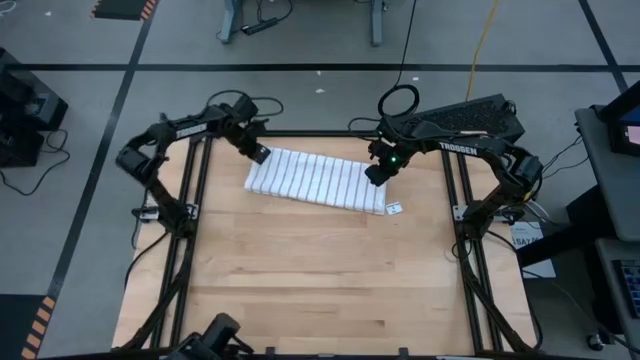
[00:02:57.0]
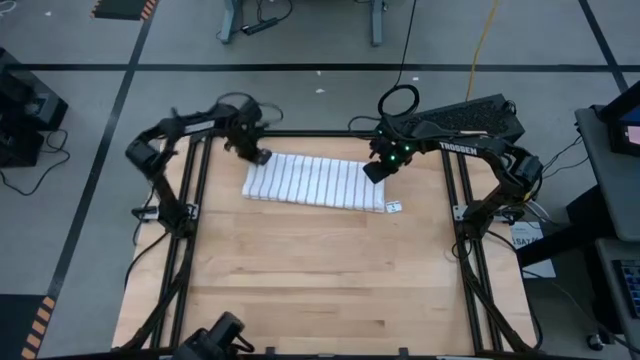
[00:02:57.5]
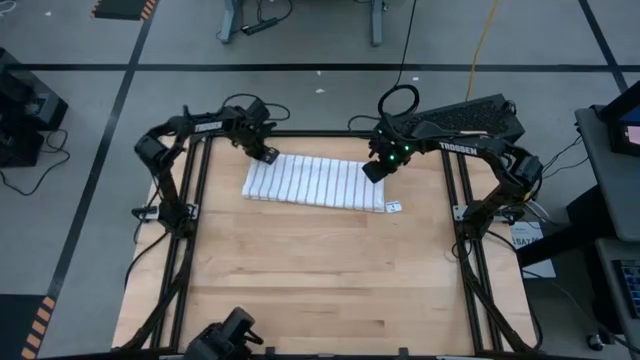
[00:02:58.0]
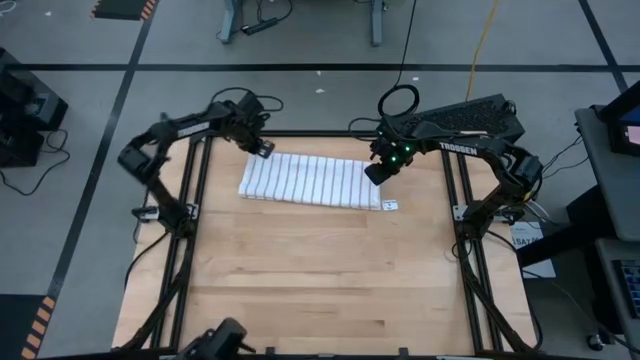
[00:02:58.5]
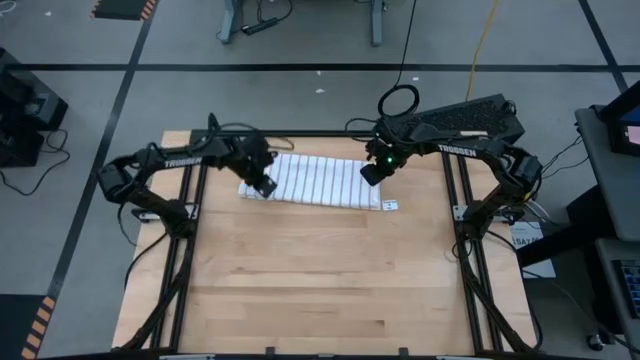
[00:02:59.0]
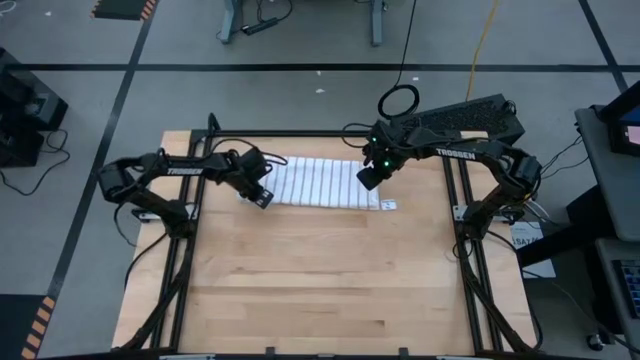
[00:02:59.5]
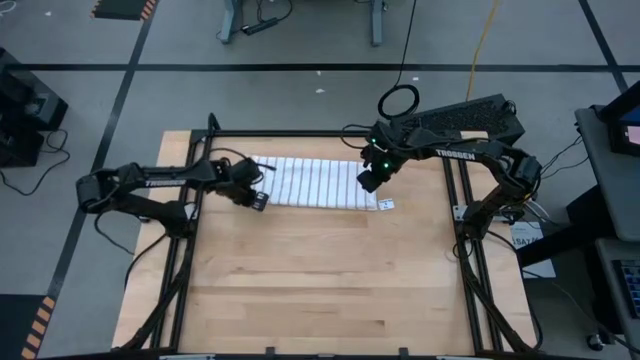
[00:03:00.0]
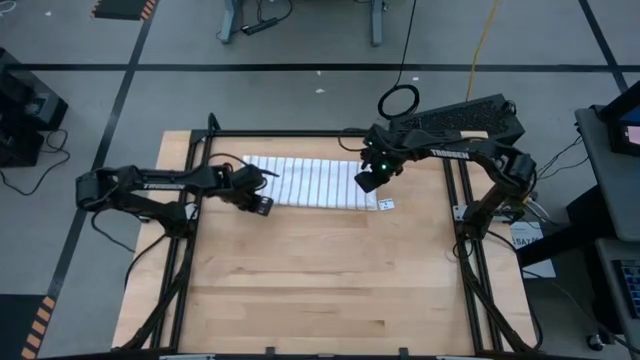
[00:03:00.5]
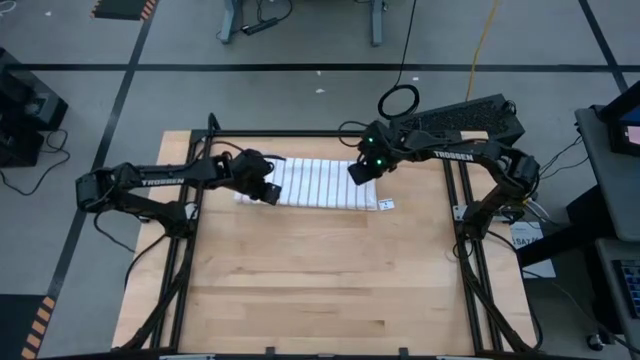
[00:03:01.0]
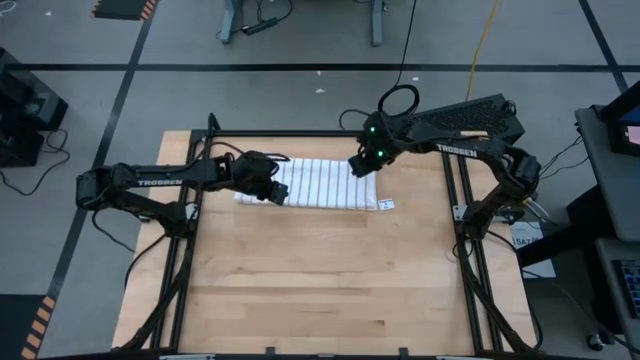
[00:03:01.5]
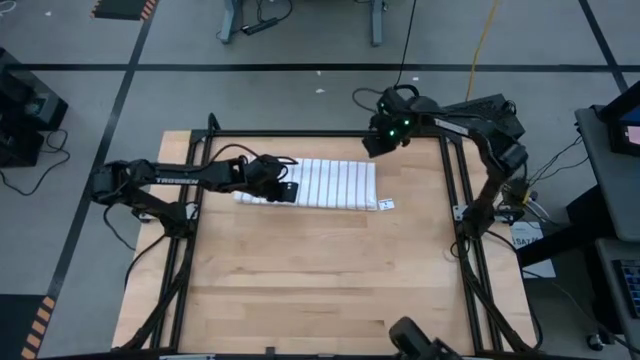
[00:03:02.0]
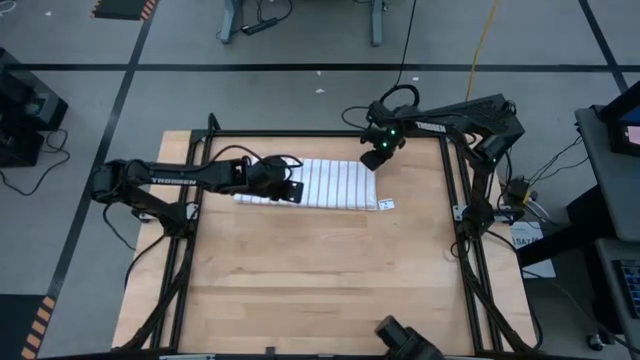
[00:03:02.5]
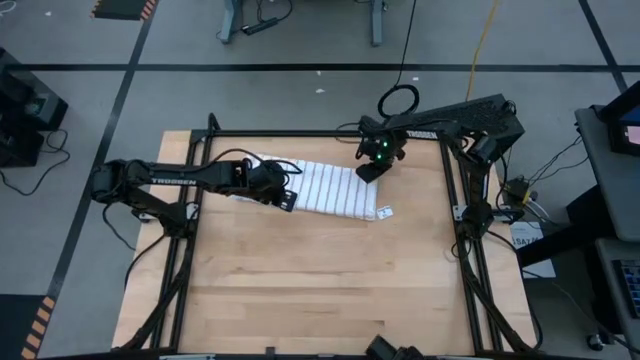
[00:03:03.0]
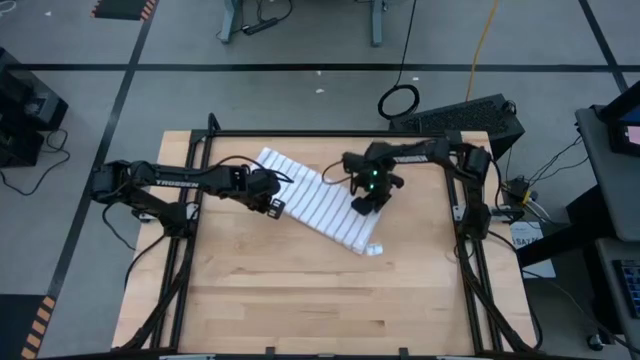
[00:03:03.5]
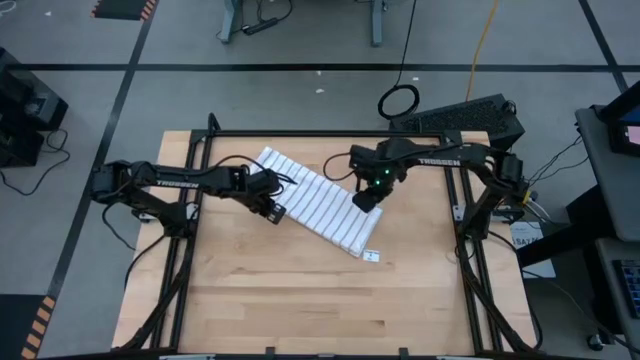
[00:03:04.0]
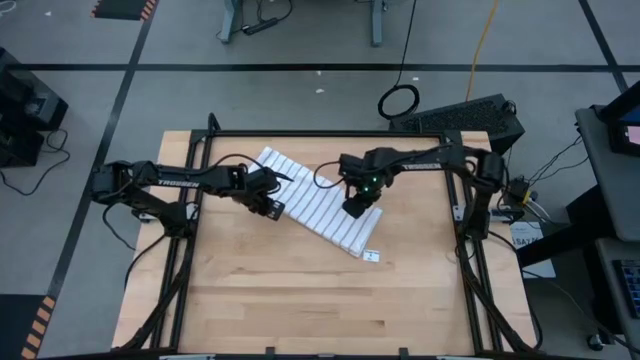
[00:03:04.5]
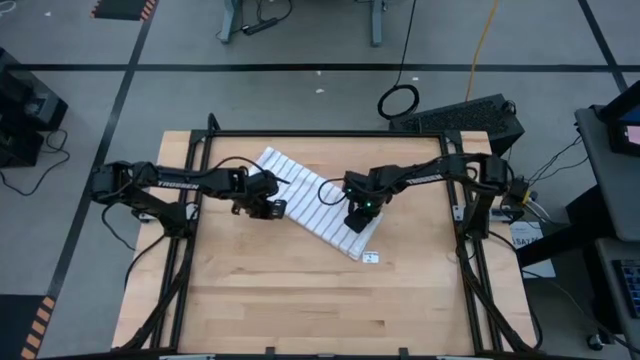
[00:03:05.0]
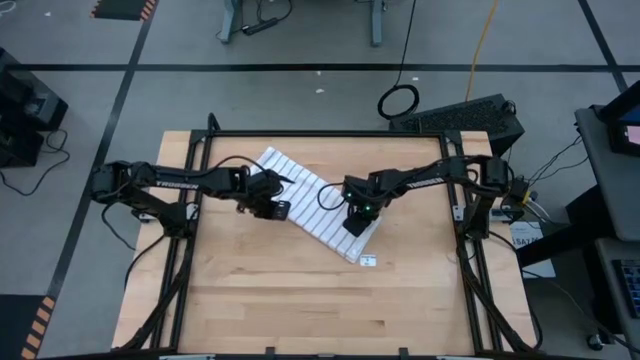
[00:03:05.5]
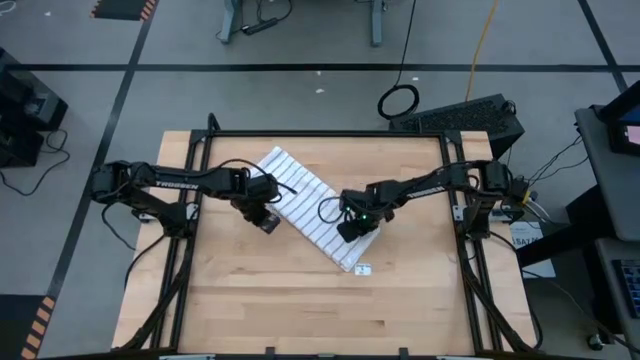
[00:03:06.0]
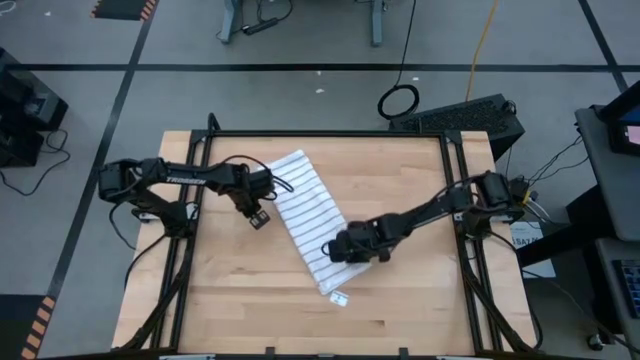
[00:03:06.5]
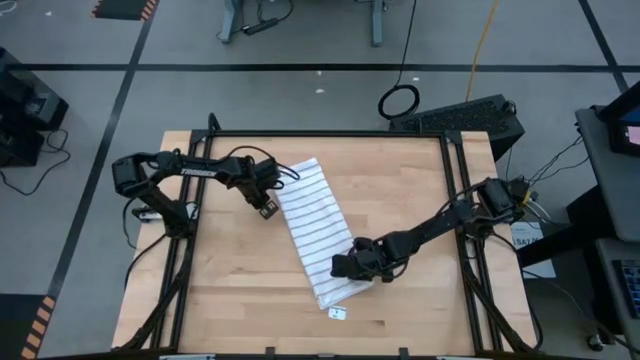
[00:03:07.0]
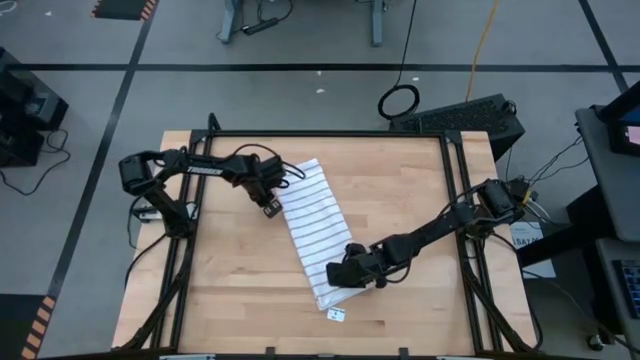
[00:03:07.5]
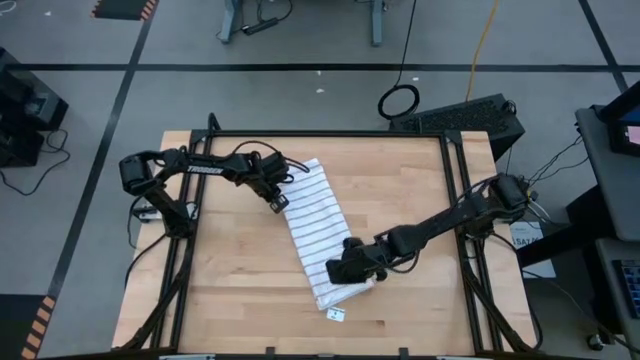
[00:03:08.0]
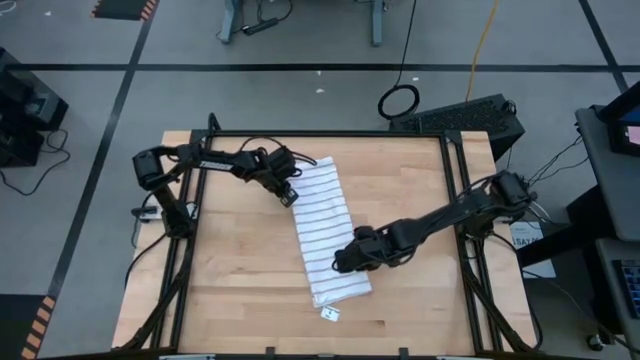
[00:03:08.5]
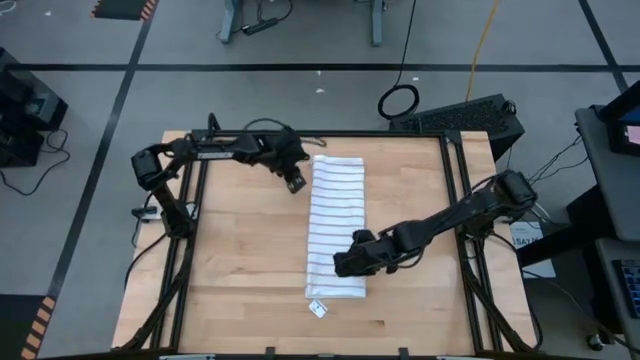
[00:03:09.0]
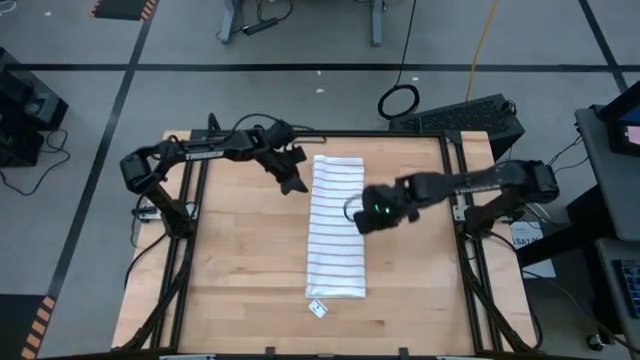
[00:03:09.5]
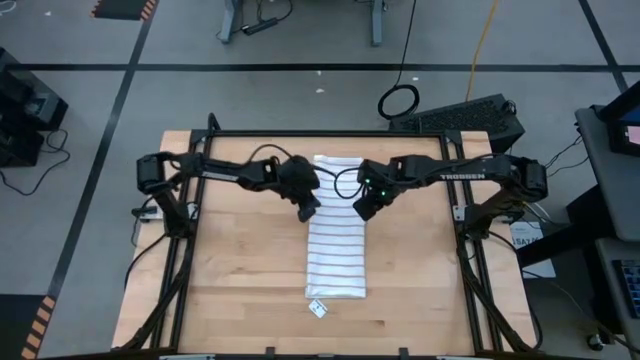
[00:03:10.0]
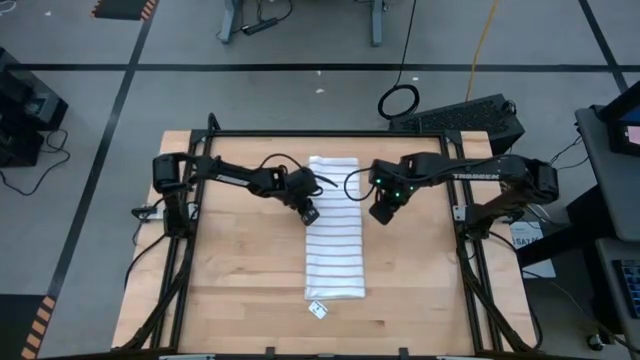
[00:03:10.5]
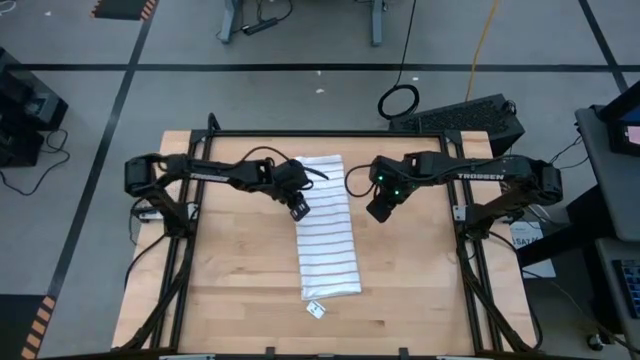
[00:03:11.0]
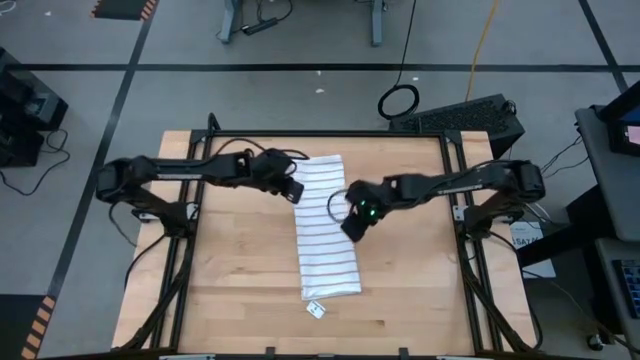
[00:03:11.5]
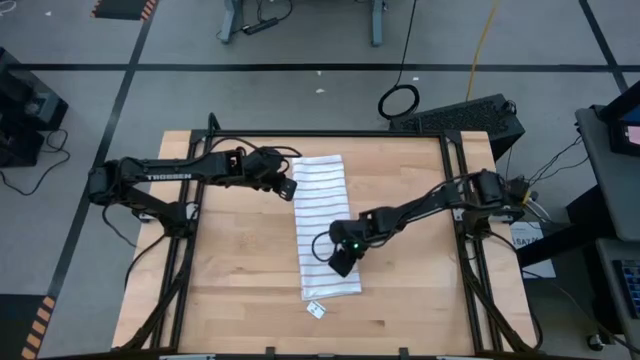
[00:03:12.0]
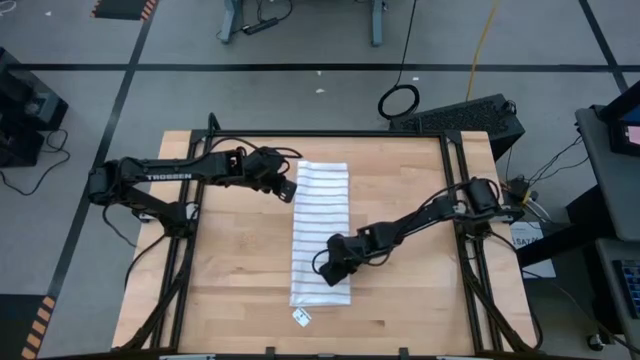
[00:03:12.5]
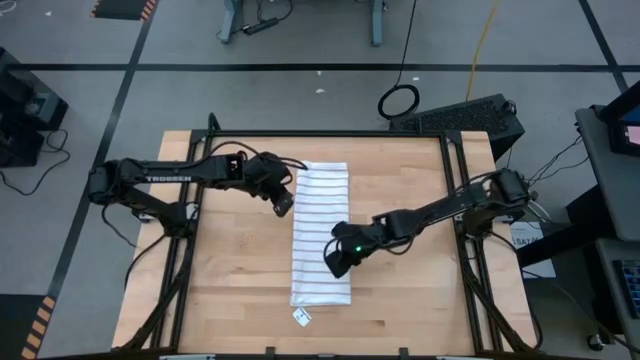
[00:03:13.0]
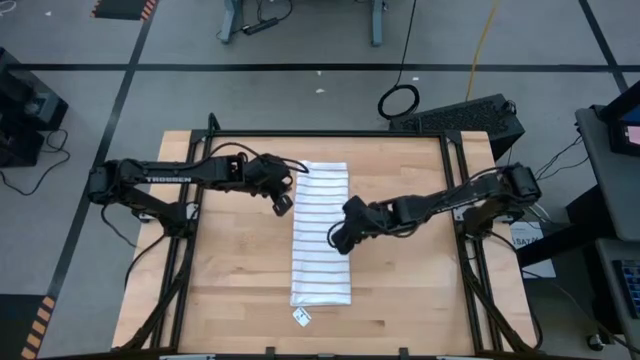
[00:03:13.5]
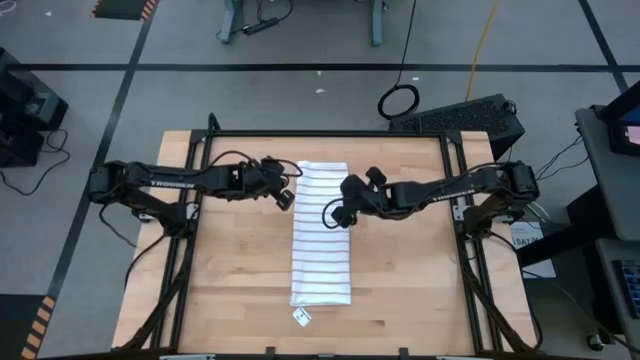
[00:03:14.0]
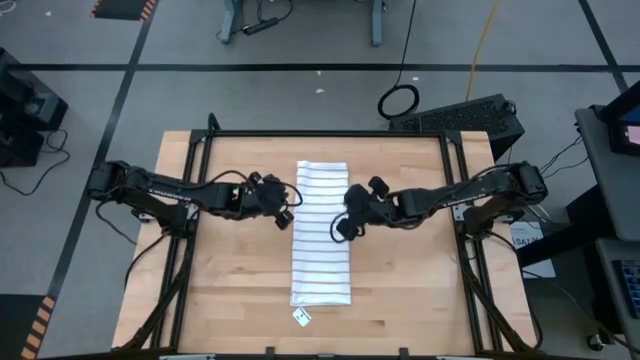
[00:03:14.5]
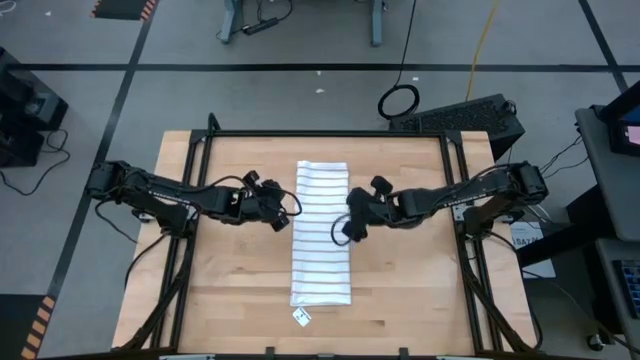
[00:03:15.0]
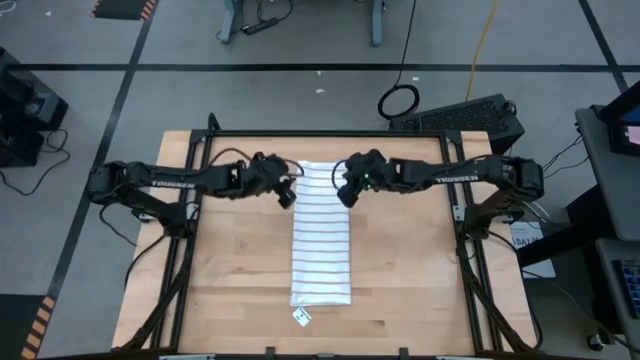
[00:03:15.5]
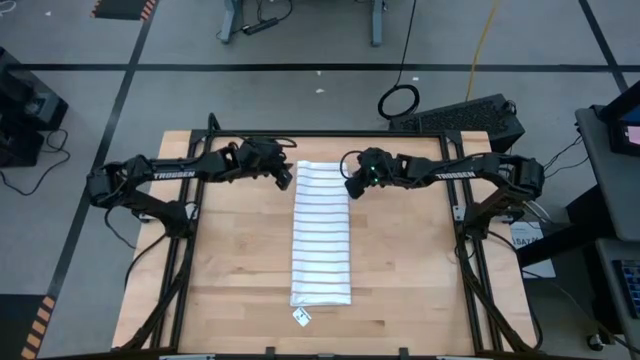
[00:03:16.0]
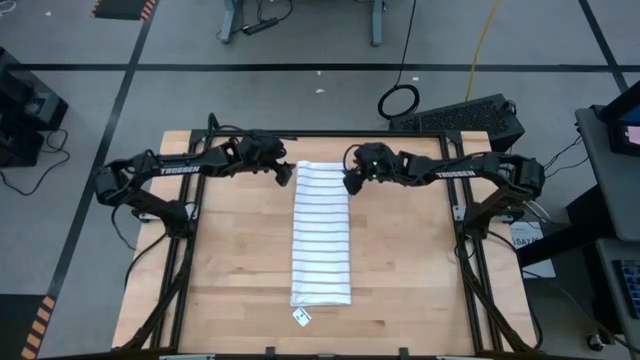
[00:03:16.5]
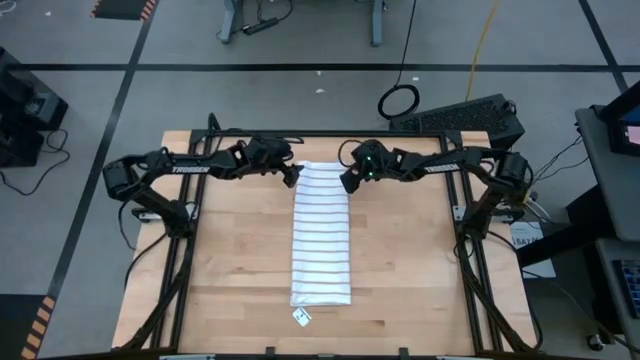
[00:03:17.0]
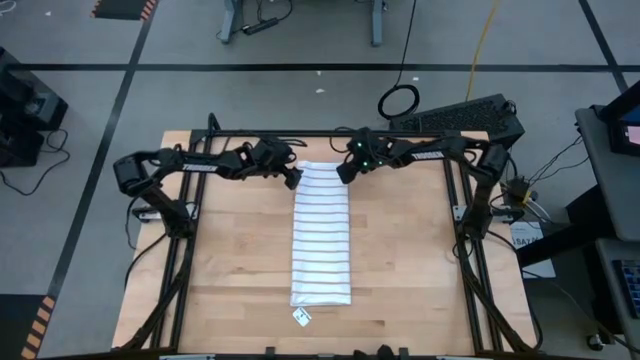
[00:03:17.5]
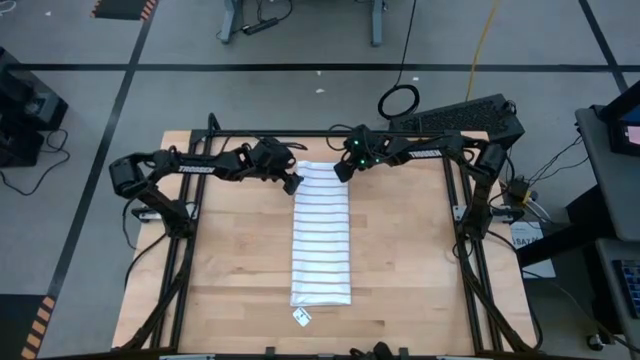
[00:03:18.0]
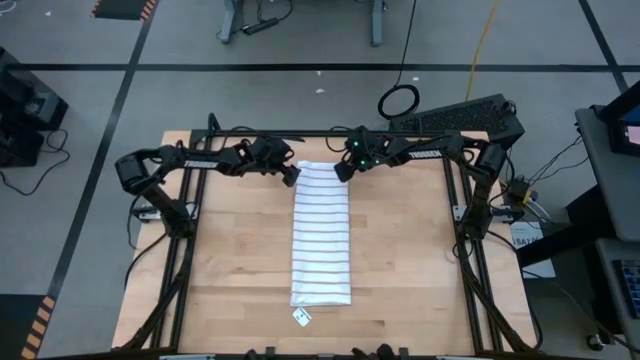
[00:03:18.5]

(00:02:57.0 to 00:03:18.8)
Task: Roll towel
Roll the white towel
